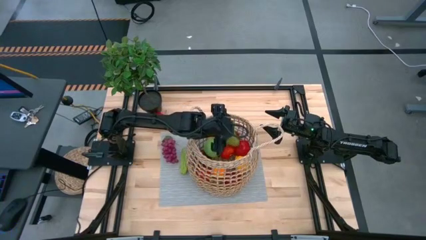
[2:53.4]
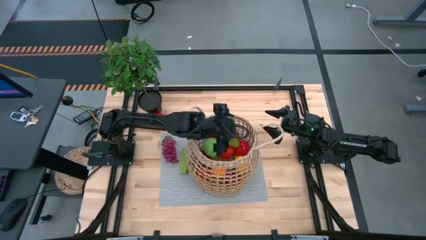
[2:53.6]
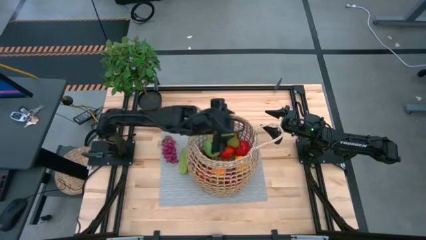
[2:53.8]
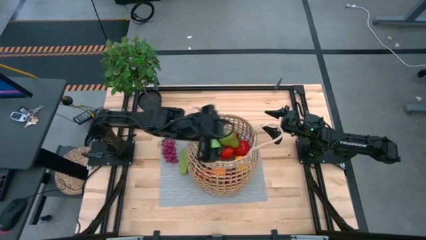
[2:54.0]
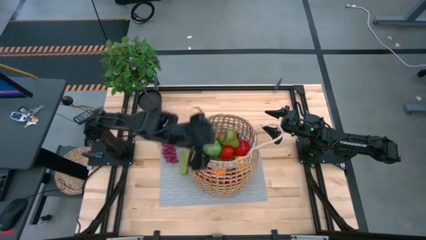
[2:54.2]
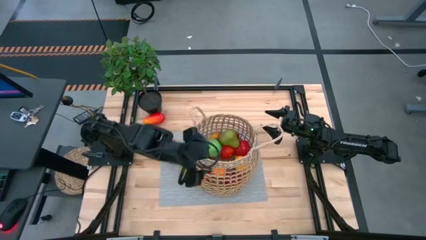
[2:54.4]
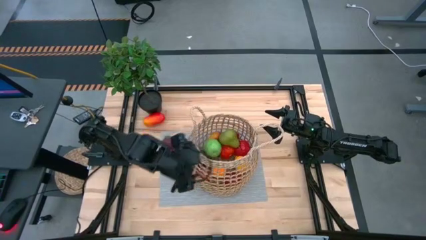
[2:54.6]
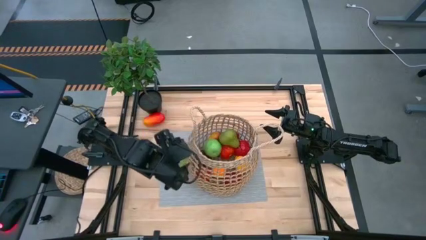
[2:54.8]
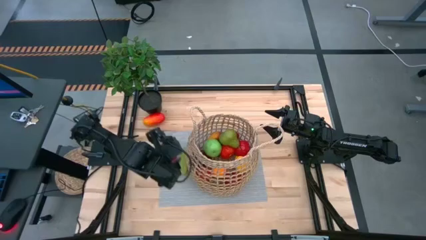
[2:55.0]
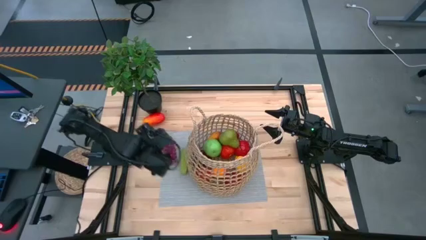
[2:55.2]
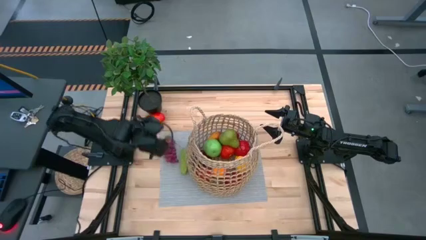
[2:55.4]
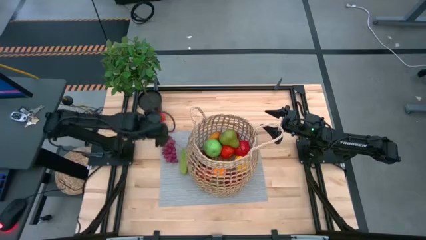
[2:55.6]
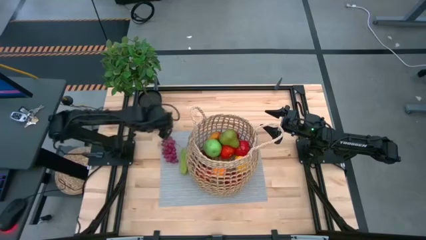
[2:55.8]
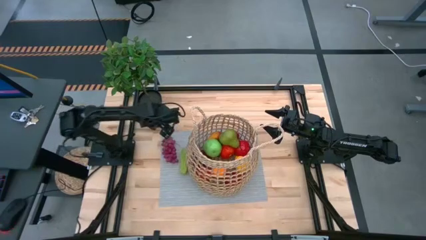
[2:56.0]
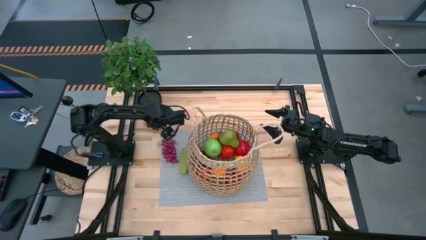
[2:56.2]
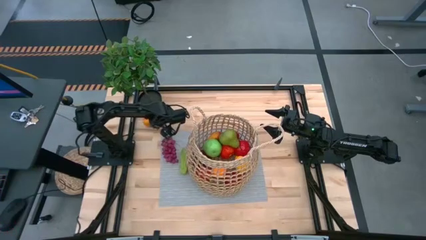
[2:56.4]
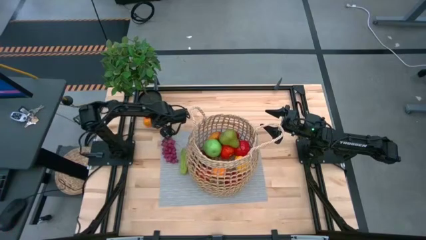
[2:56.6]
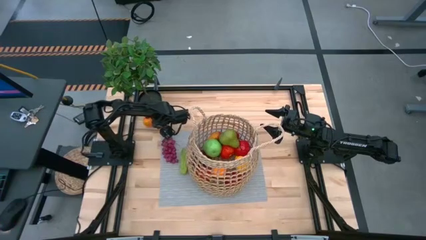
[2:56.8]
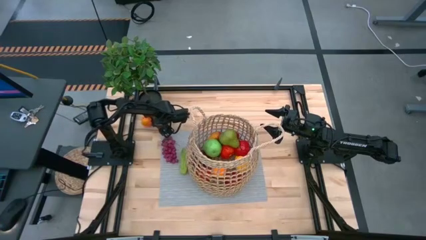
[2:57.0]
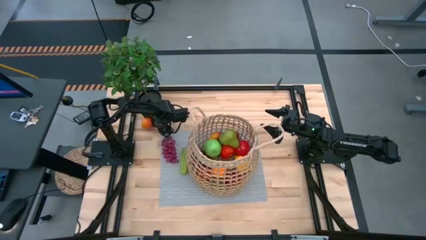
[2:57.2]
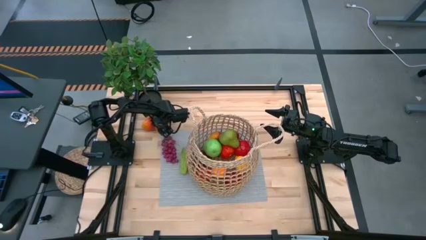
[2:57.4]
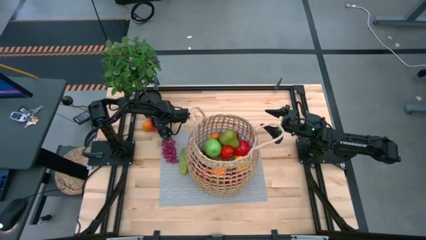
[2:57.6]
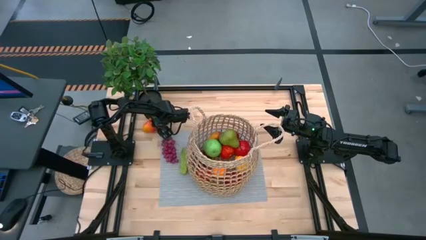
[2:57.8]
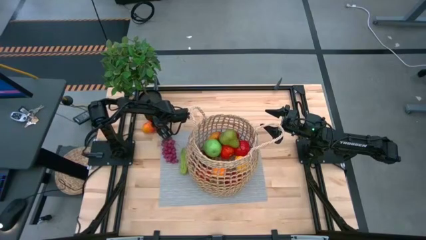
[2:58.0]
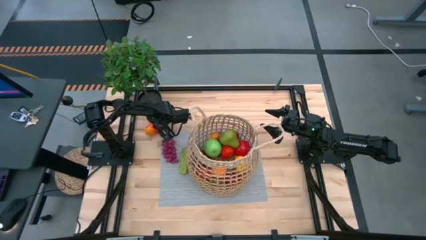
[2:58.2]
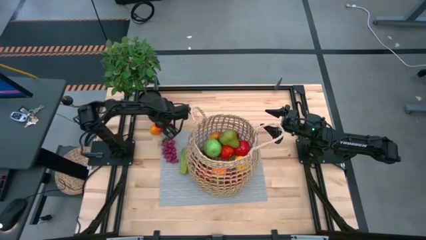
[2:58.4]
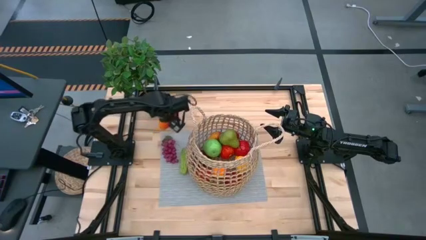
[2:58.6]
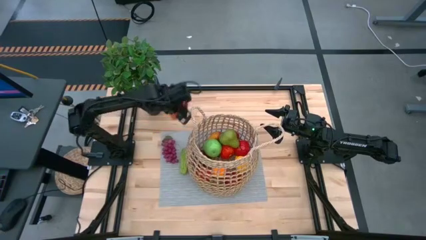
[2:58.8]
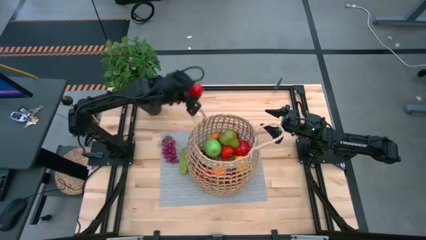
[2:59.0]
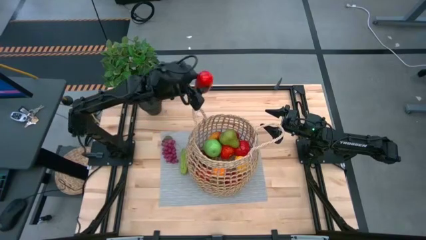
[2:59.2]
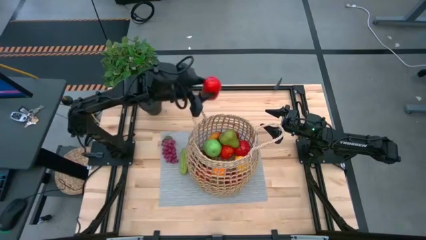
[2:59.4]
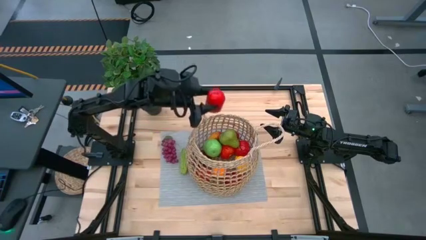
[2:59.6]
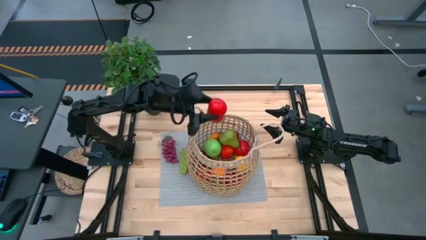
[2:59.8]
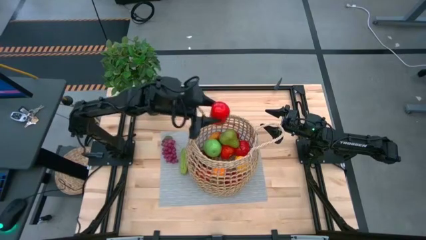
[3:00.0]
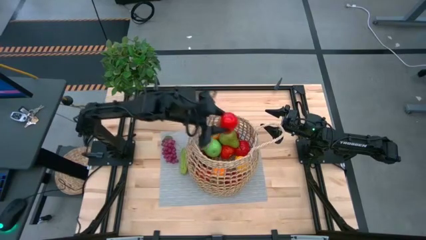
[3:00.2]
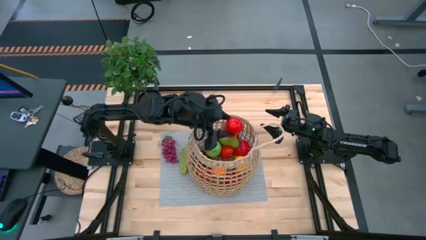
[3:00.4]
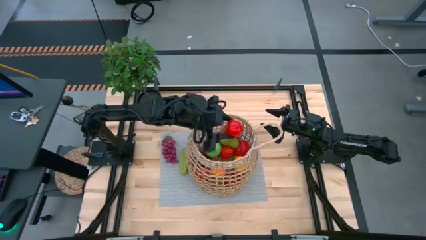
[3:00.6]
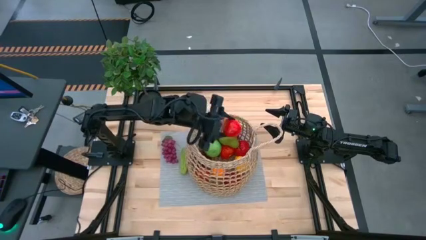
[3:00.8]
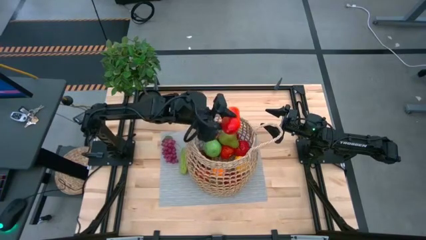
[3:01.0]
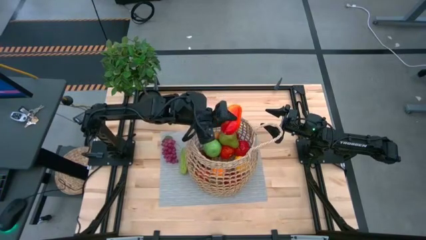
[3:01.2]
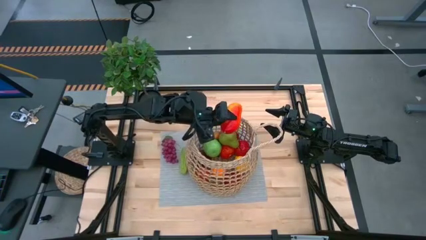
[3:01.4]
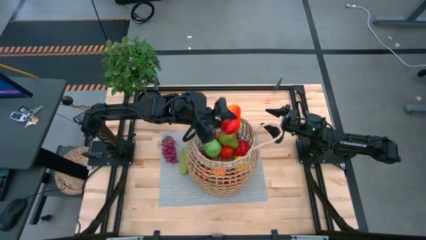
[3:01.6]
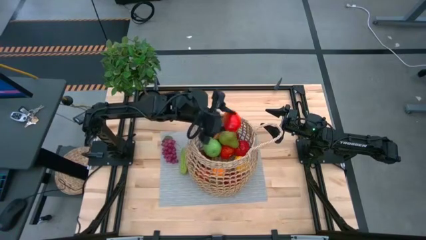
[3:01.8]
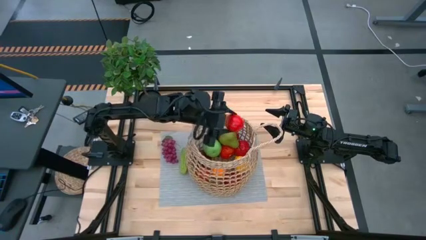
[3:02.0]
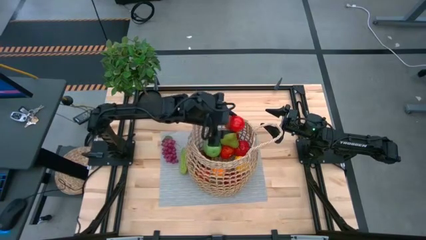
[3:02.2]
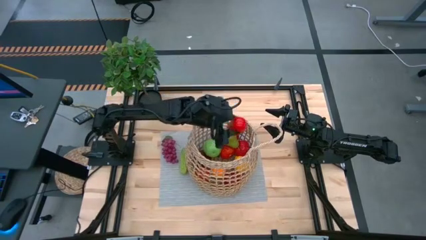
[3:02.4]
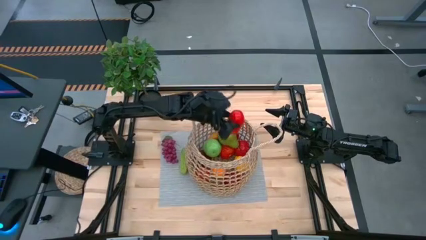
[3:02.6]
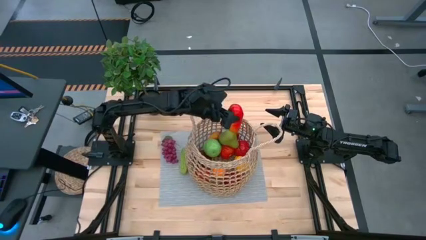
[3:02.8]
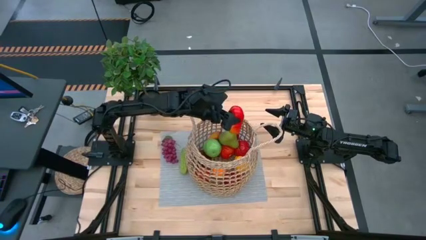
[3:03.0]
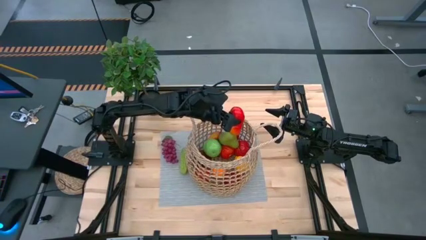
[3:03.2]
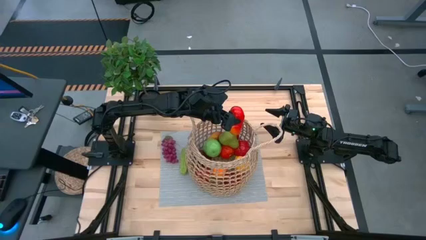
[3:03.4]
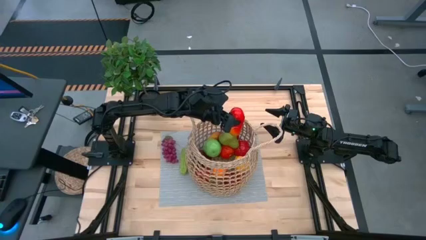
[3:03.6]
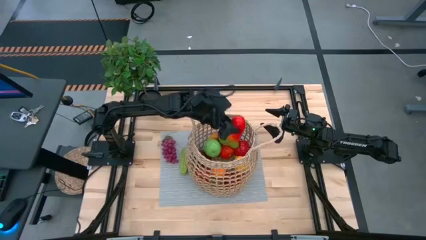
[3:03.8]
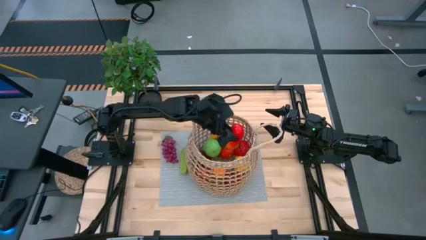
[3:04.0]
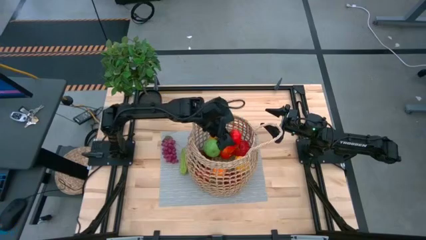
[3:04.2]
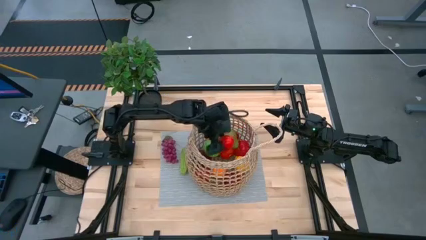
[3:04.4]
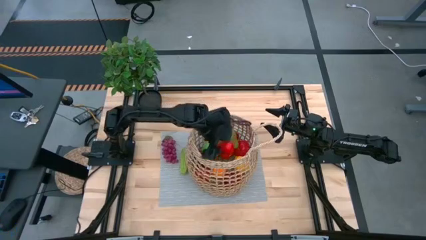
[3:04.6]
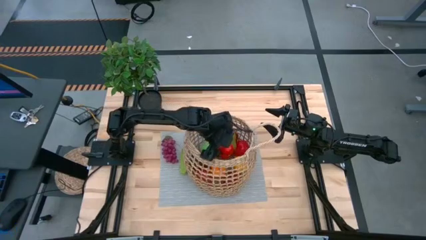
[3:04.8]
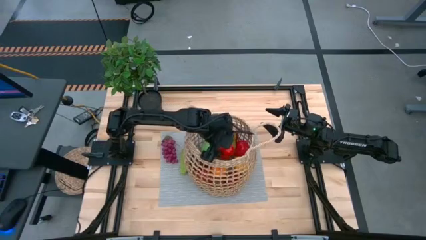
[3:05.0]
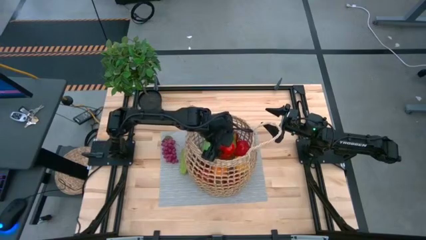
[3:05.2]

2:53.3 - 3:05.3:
Task: Build produce basket
Put the red mango into the brown basket

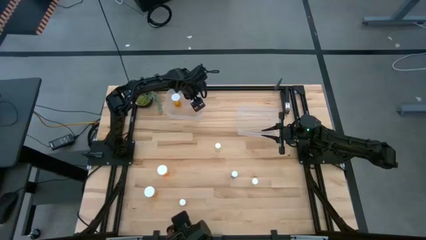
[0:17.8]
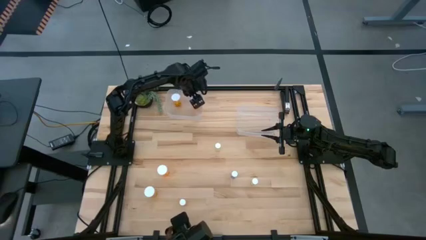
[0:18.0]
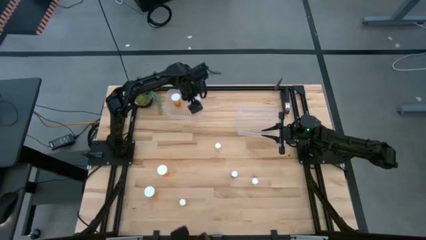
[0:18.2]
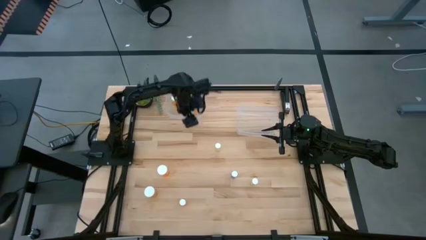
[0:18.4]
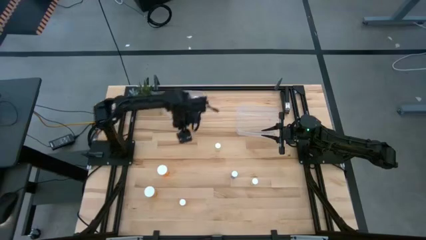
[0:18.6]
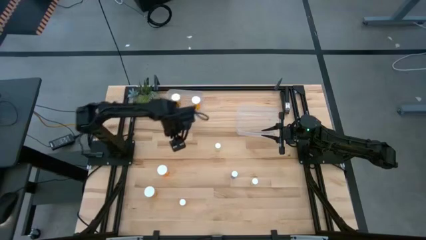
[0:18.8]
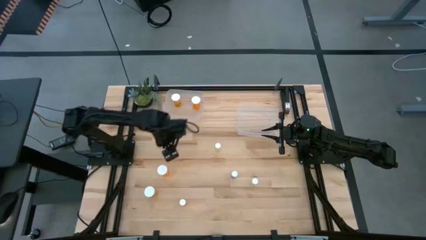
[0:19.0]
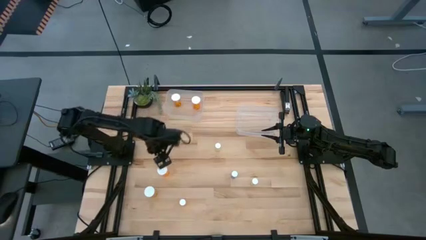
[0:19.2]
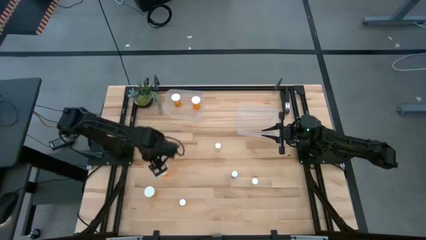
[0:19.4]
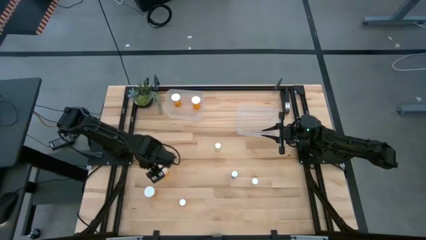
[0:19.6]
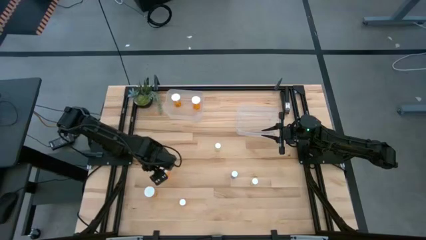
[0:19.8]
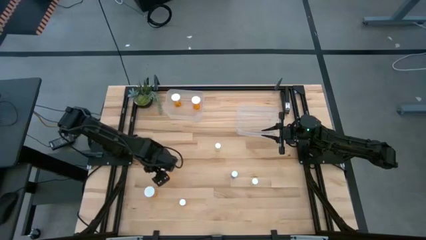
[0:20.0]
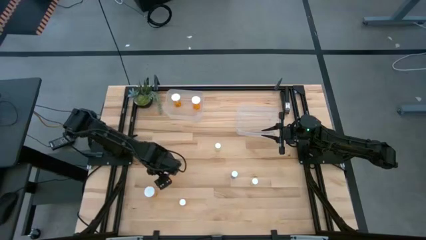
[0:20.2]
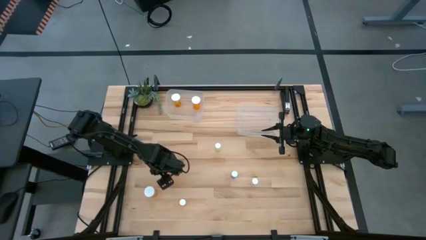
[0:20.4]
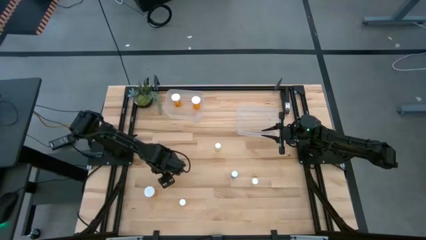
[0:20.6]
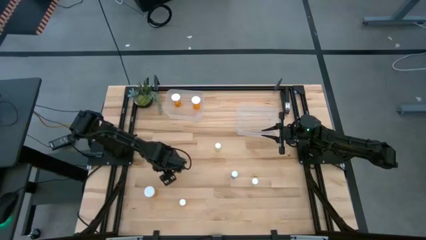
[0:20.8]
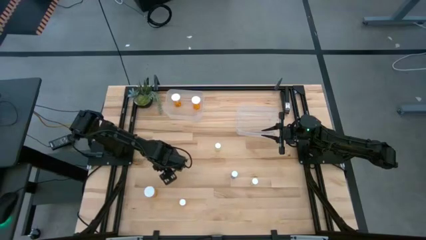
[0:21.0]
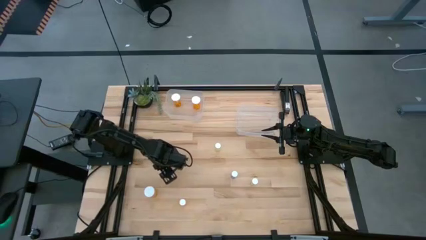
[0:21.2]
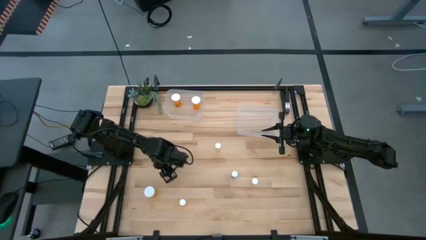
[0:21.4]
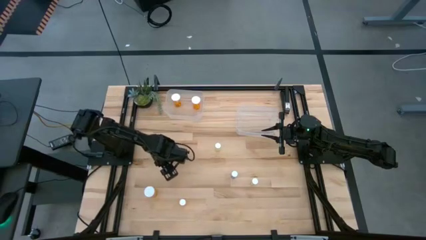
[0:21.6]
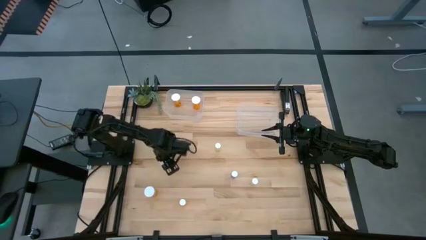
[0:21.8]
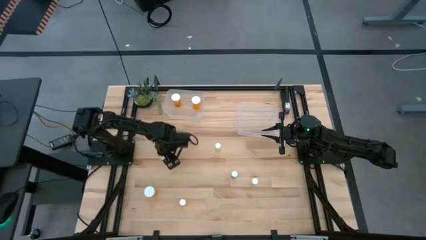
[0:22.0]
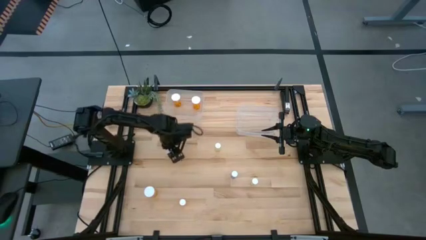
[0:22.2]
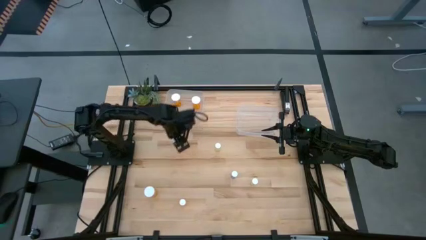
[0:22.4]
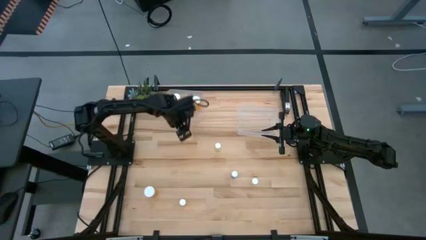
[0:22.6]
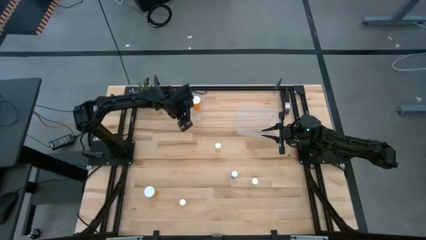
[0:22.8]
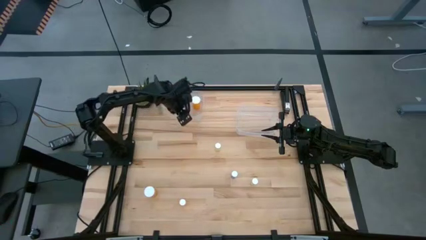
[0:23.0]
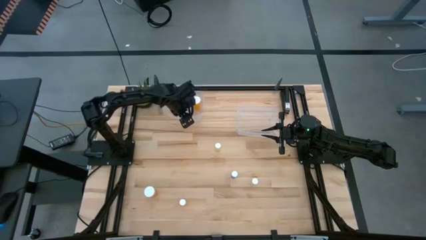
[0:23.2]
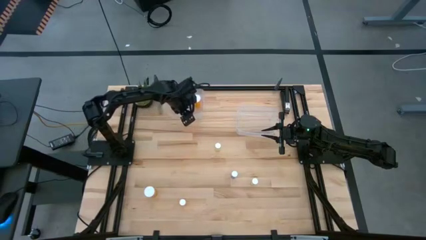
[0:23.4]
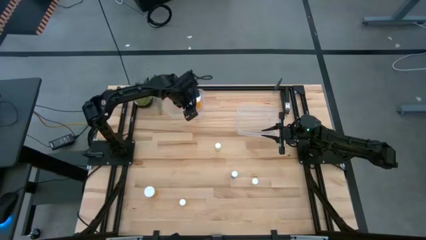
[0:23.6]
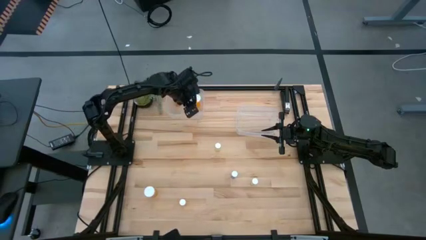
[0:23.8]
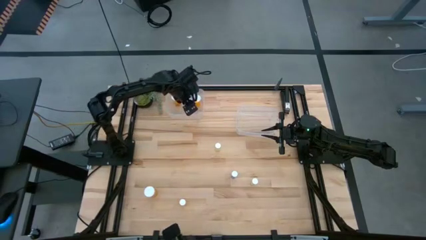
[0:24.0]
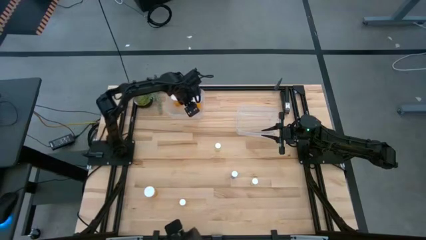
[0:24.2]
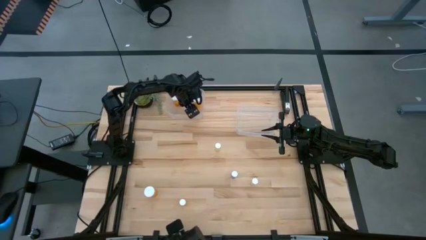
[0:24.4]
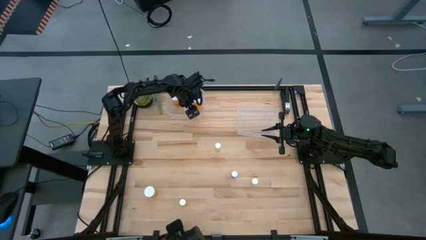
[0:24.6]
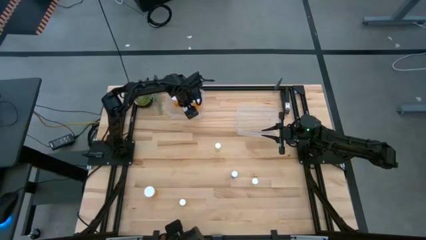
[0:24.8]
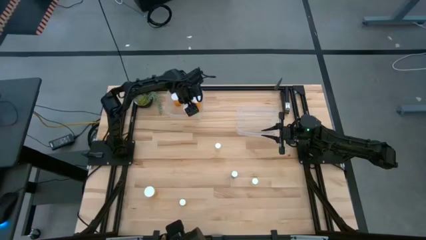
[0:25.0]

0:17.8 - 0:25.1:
Task: Pick and place medicine bottles into bin by pill shape (circle, oval)
Put the large orange pill bottle into the left transparent bin
